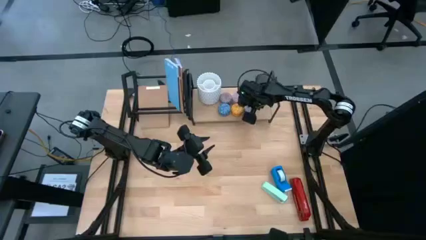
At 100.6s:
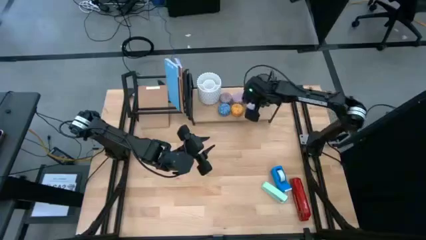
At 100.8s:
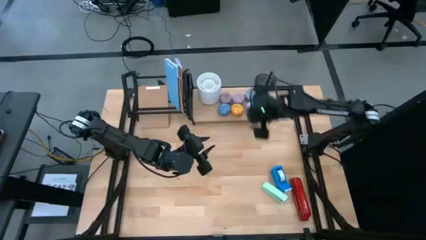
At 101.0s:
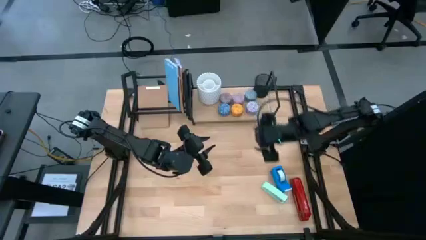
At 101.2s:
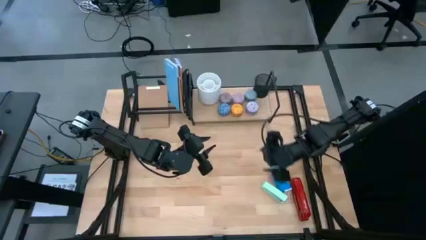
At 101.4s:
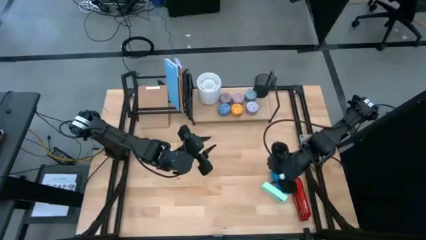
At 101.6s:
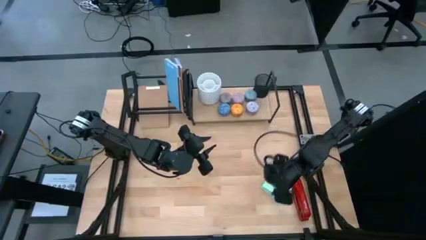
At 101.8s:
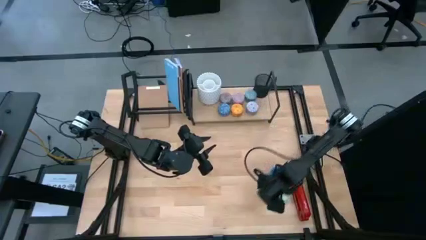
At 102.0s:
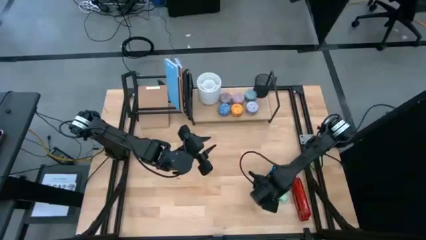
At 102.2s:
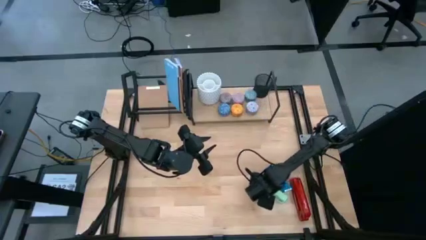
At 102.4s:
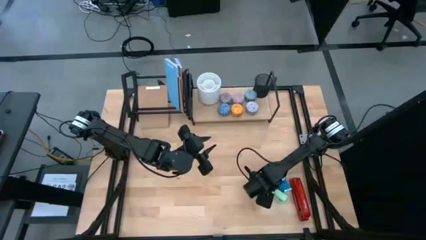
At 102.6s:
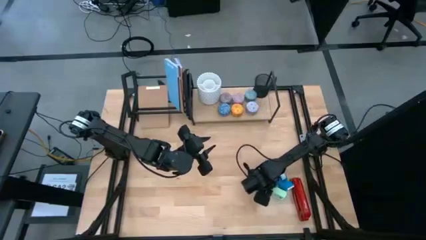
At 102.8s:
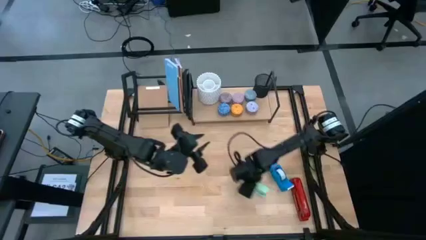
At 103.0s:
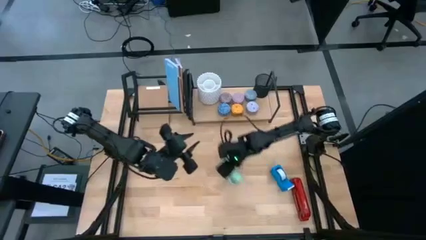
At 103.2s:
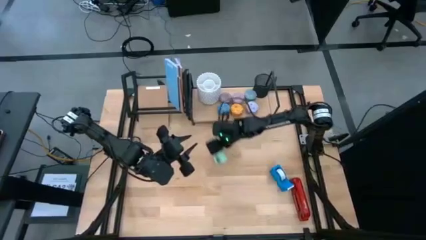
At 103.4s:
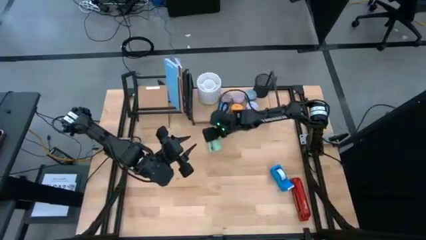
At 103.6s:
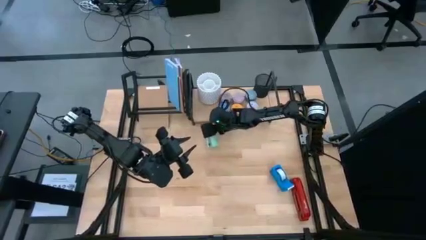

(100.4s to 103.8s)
Task: Stock shelves
Put the green stapler under the left of the shelf

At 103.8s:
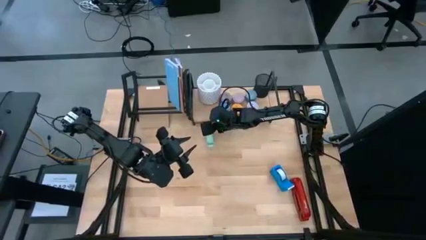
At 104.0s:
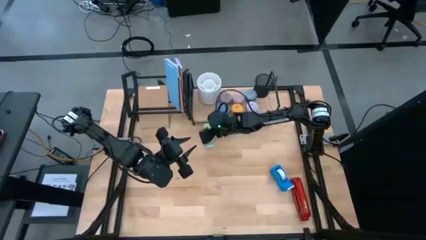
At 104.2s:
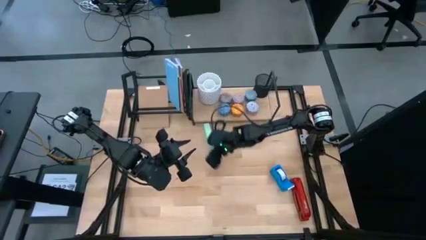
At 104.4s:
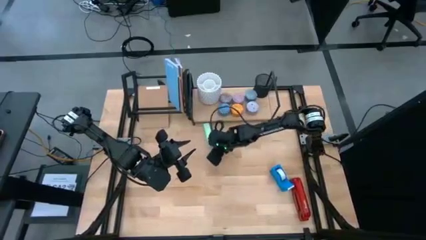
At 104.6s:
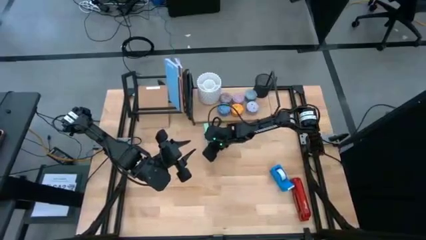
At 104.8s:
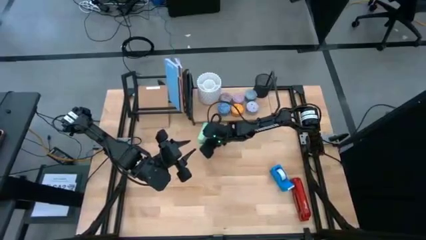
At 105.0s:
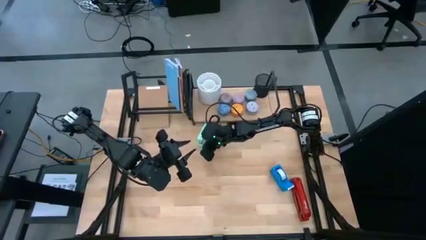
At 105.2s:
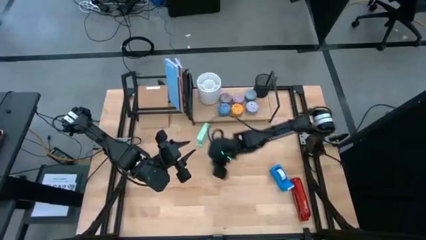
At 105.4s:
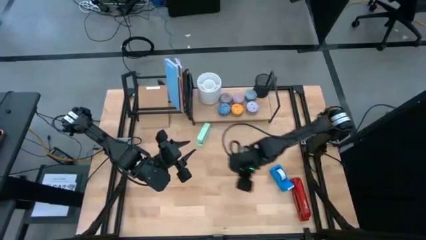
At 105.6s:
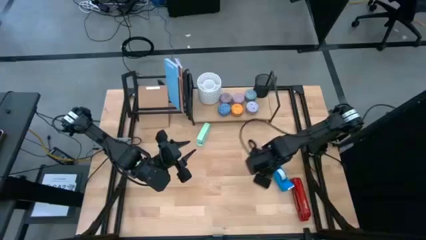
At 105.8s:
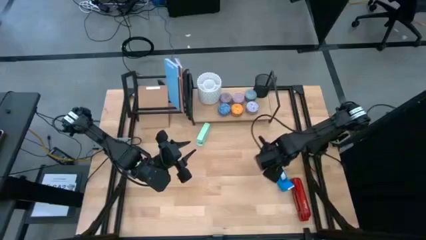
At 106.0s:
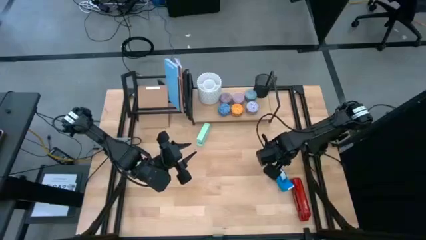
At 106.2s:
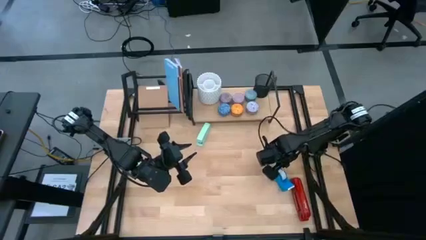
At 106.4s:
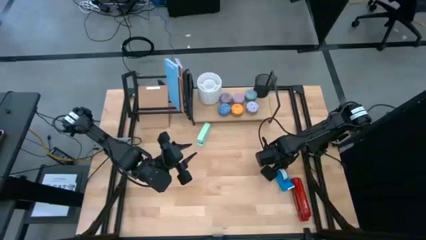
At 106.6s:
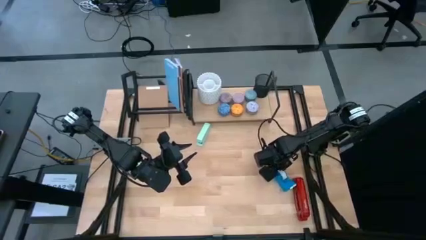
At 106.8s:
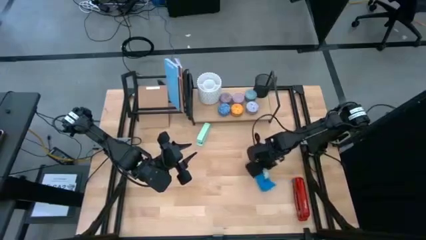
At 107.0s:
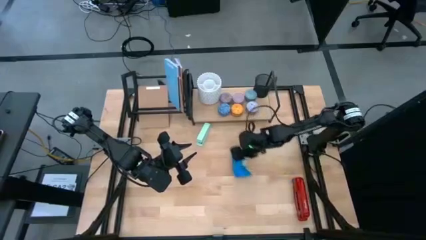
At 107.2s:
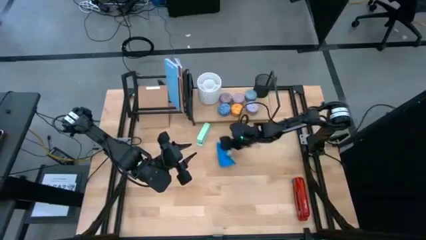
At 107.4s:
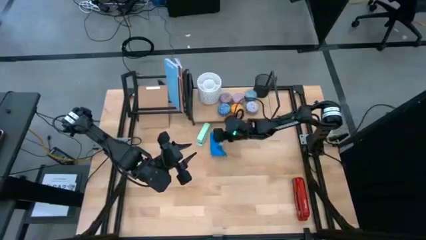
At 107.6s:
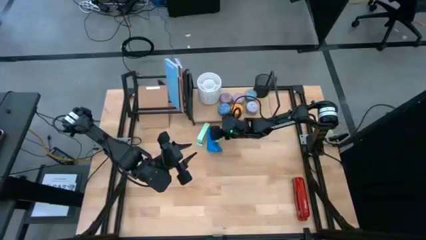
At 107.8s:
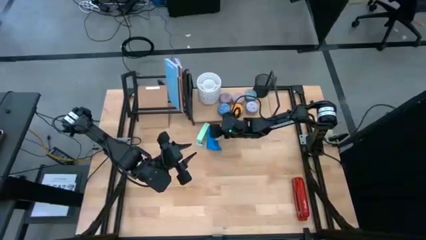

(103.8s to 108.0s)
Put the blue tape dispenser under the left of the shelf

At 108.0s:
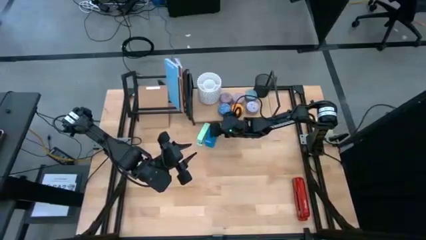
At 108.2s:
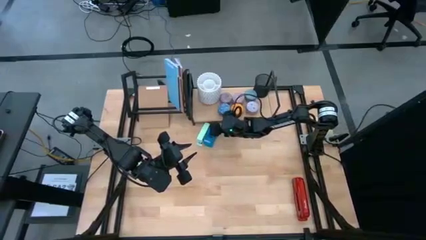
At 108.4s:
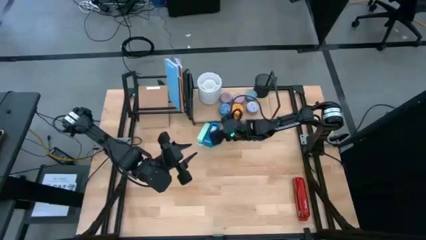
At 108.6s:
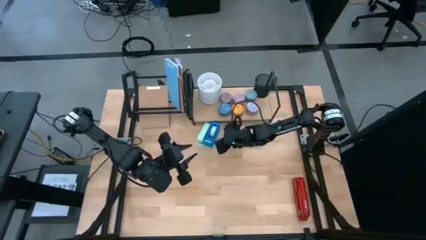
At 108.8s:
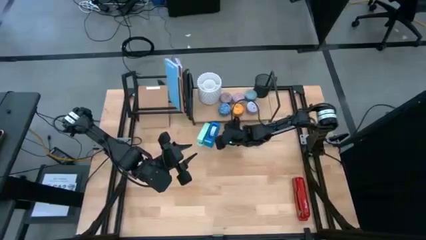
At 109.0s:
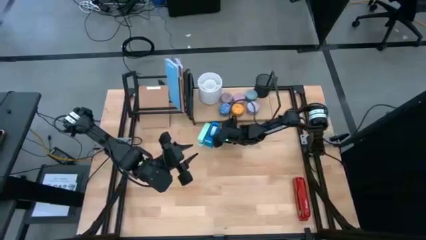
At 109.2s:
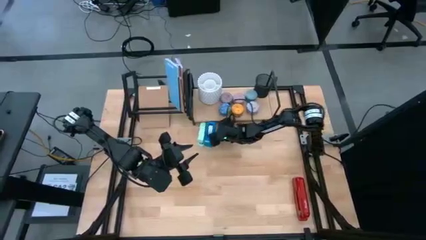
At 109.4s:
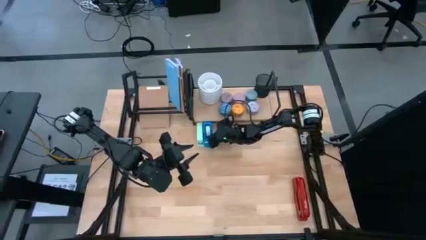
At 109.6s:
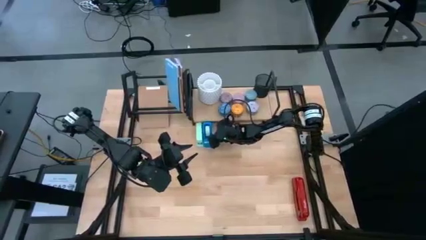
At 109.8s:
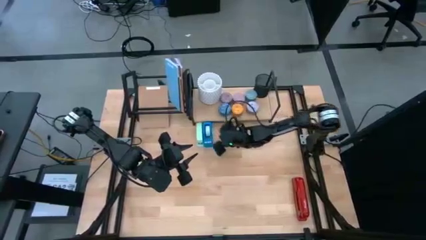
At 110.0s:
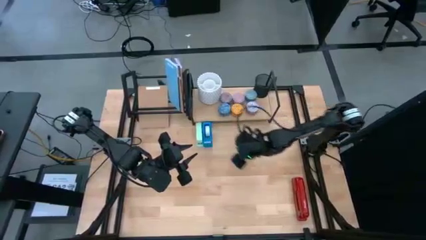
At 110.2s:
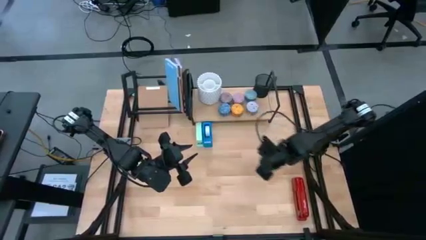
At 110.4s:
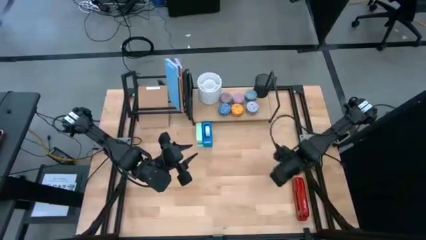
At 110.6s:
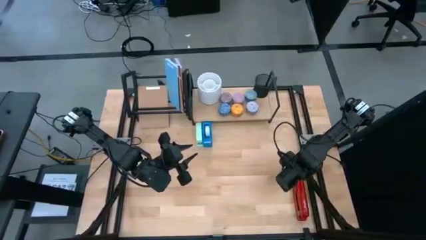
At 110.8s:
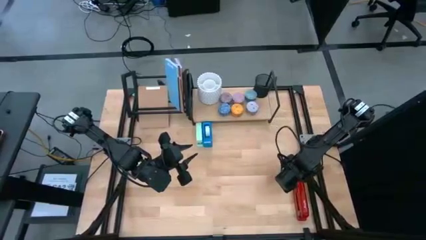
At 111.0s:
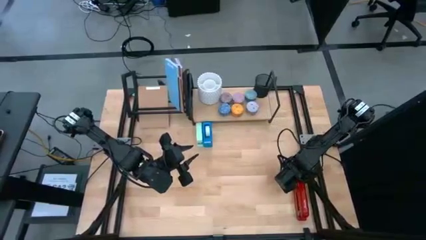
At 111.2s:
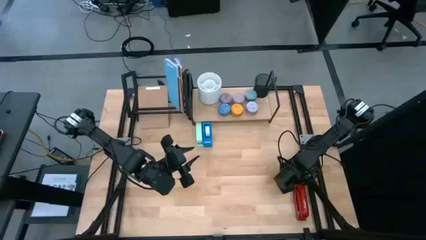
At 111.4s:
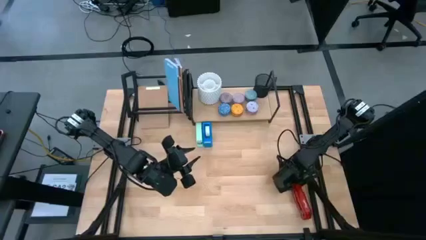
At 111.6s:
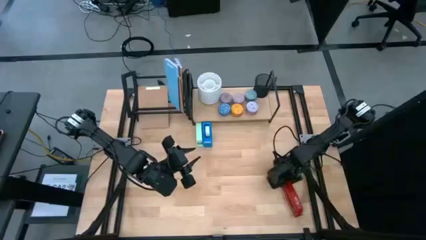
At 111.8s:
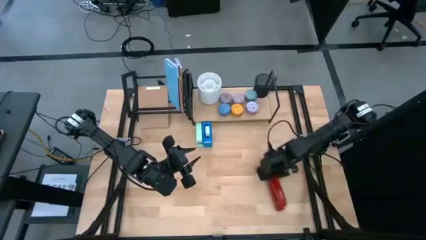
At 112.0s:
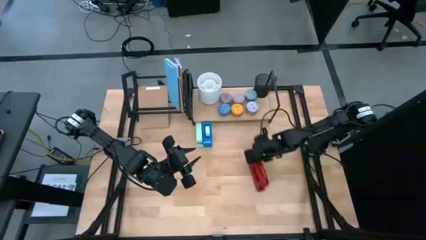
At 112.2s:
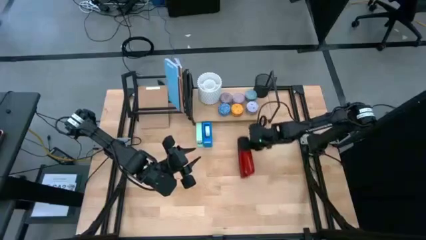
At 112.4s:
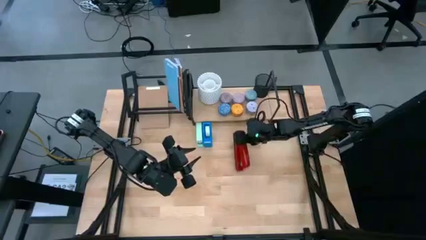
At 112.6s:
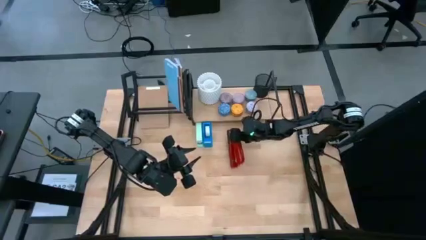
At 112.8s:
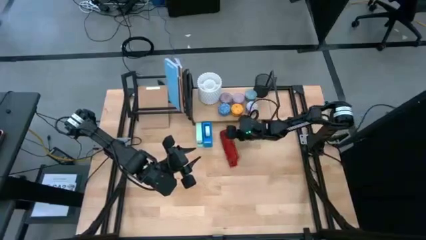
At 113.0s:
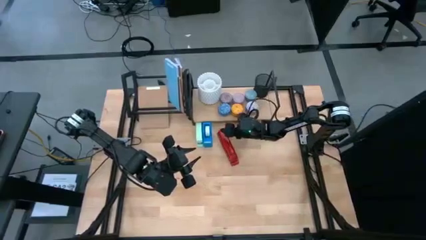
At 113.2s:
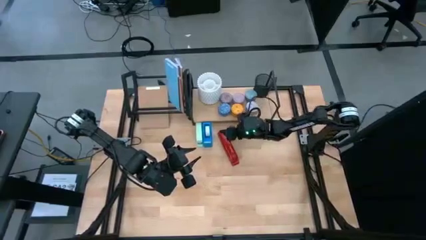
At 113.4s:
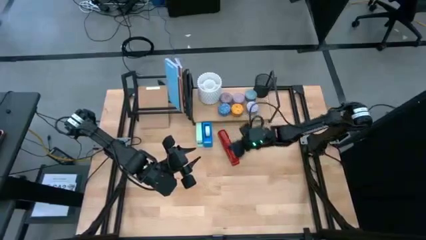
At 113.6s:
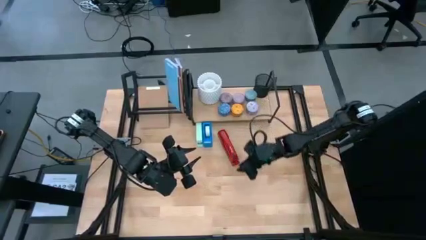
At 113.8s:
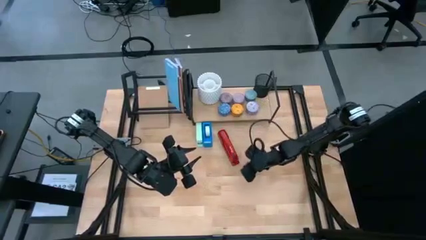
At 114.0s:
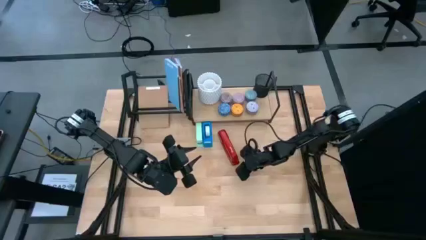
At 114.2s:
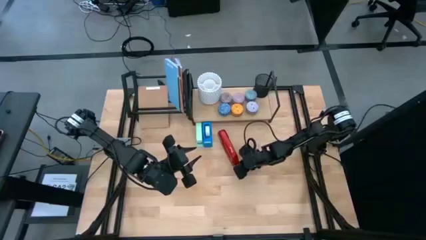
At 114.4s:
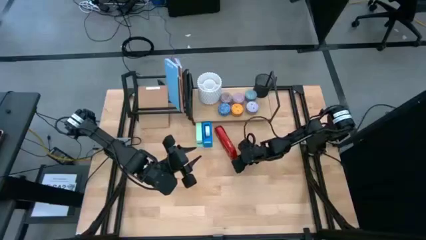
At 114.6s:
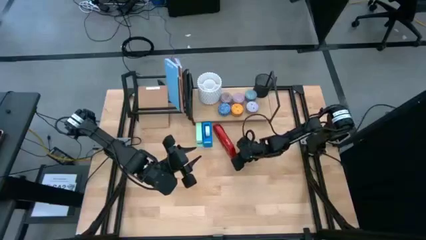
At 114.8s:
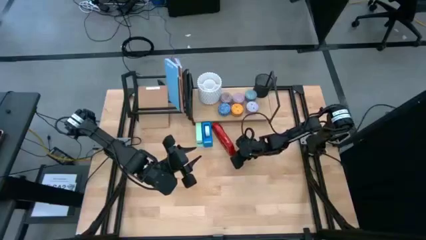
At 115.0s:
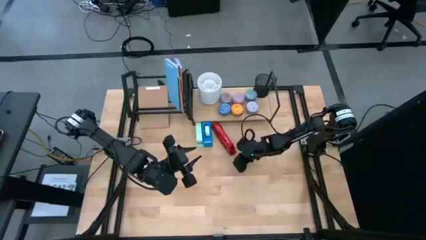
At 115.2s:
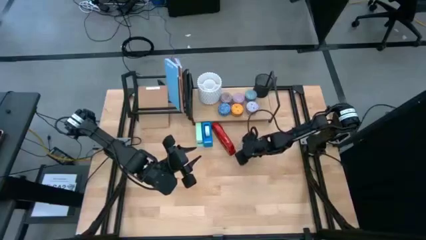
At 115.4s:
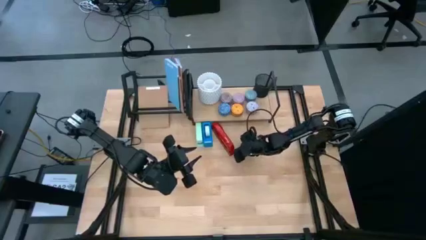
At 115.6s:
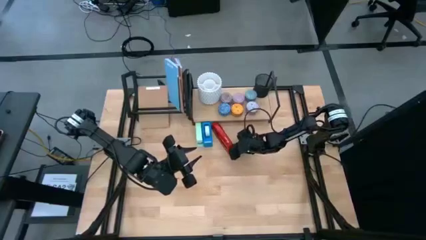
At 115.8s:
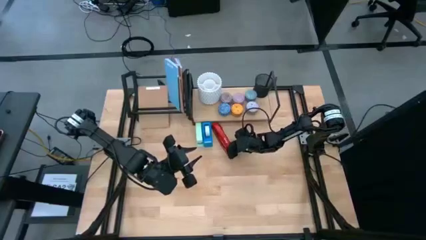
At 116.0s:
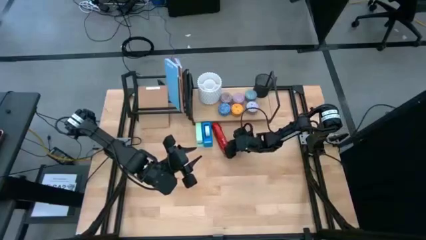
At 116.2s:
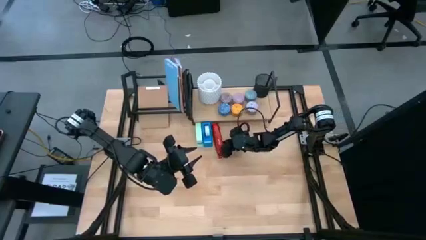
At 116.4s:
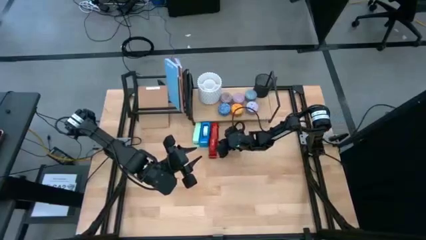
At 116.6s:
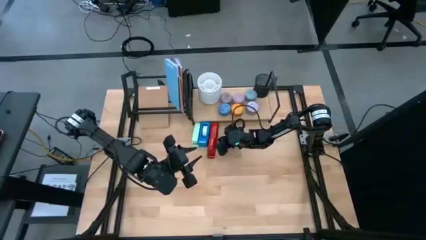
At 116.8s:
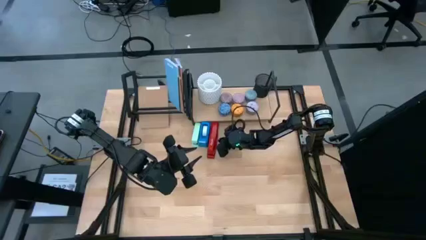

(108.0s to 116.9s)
Put the red stapler under the left of the shelf
